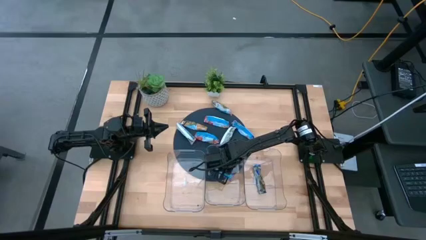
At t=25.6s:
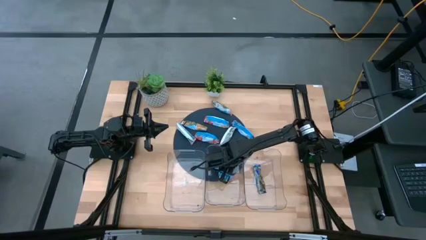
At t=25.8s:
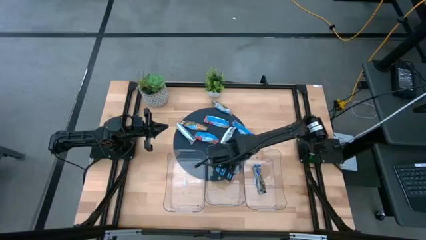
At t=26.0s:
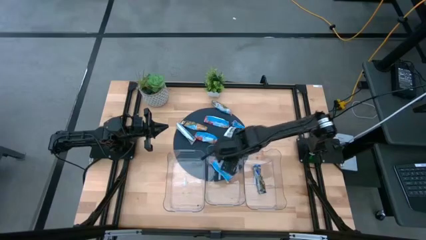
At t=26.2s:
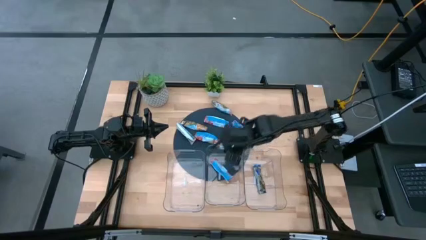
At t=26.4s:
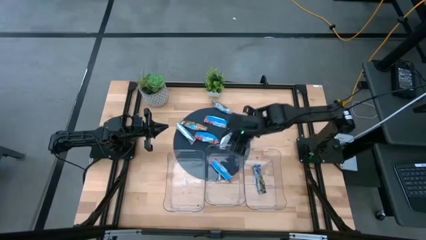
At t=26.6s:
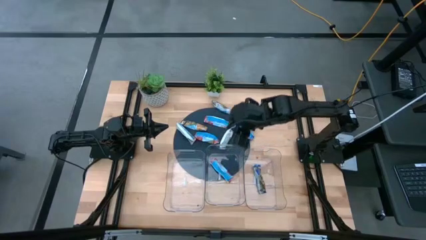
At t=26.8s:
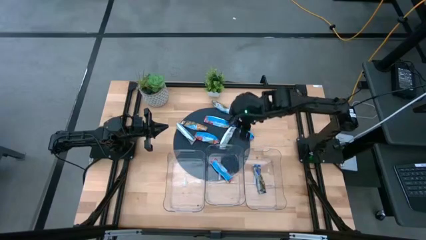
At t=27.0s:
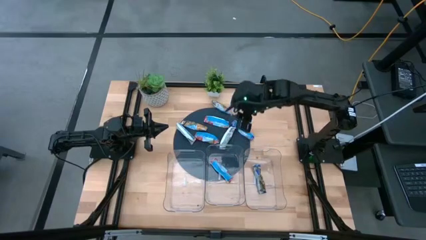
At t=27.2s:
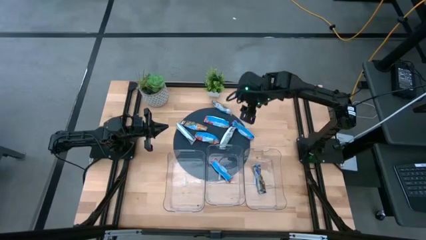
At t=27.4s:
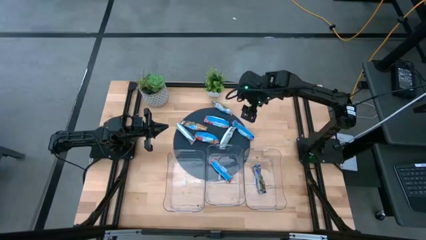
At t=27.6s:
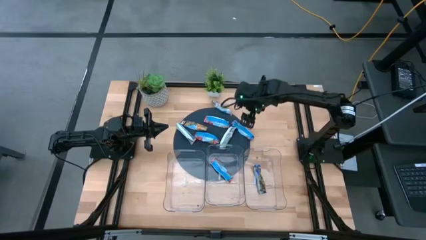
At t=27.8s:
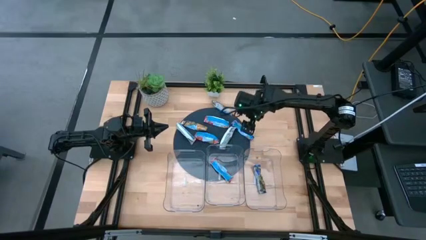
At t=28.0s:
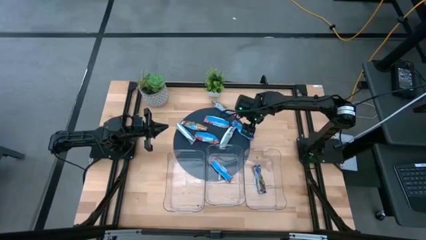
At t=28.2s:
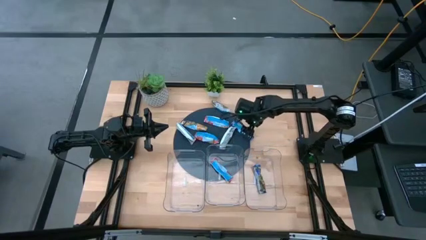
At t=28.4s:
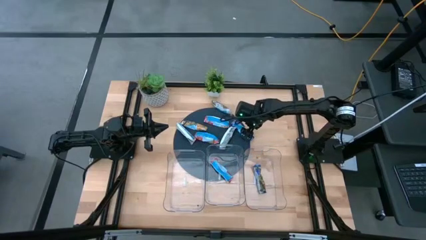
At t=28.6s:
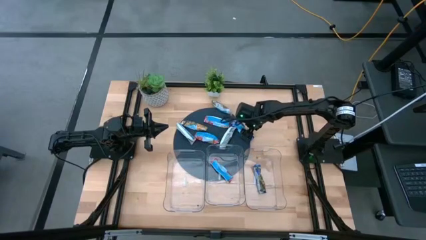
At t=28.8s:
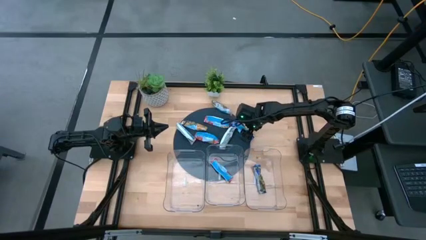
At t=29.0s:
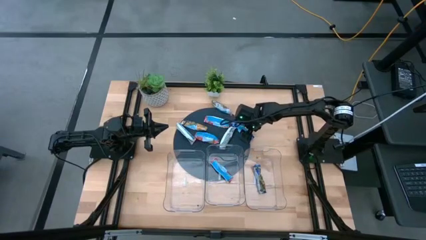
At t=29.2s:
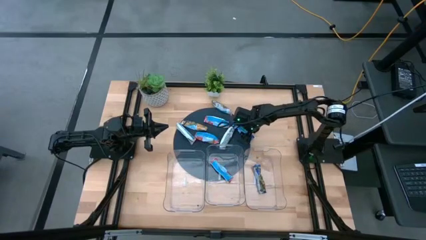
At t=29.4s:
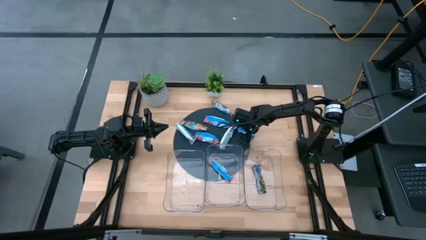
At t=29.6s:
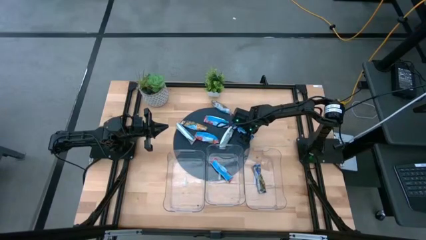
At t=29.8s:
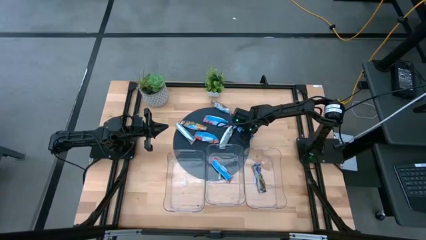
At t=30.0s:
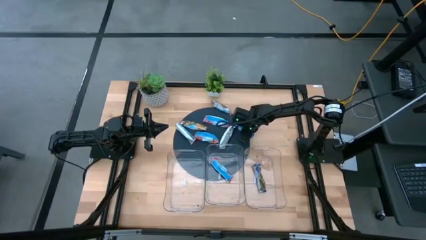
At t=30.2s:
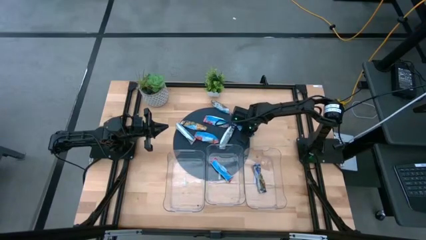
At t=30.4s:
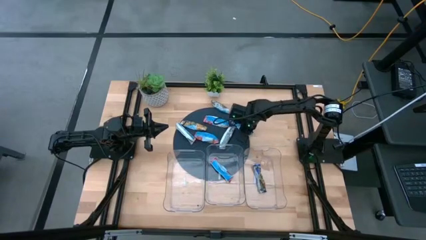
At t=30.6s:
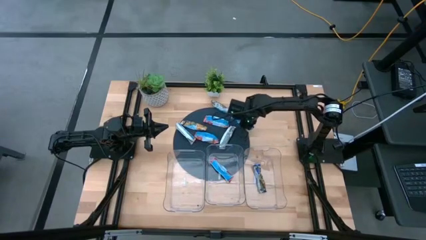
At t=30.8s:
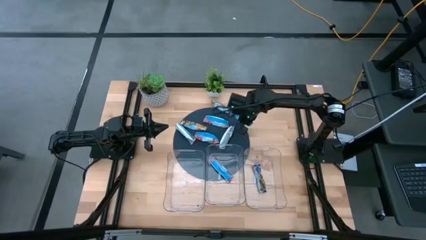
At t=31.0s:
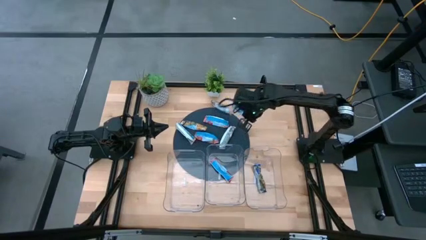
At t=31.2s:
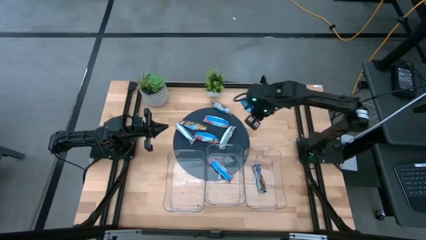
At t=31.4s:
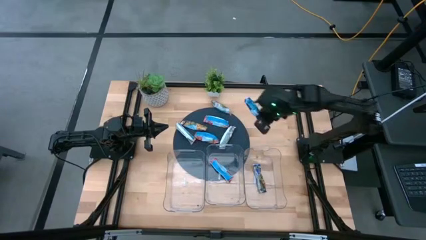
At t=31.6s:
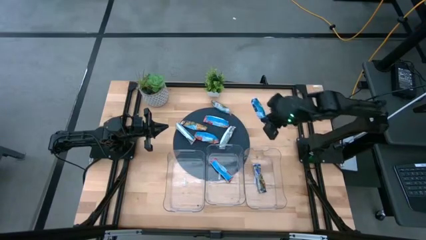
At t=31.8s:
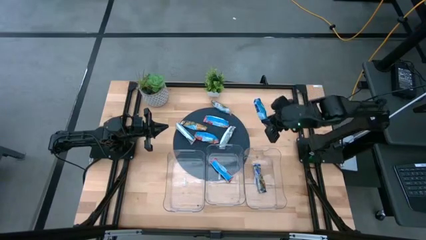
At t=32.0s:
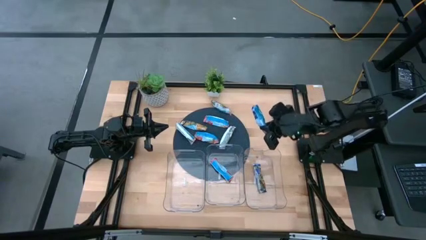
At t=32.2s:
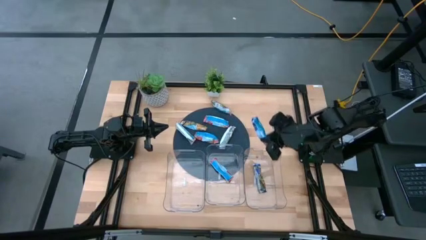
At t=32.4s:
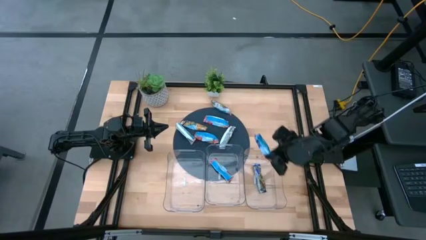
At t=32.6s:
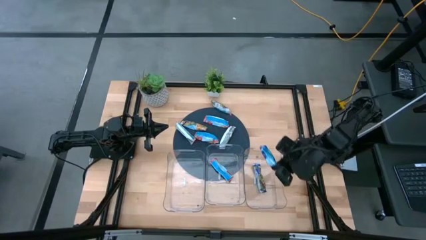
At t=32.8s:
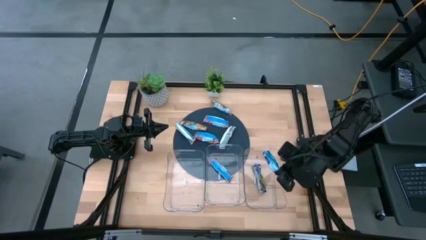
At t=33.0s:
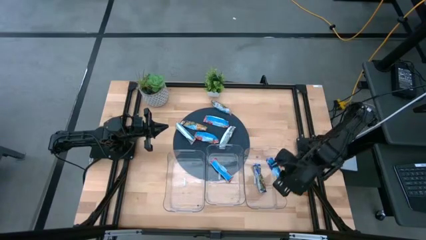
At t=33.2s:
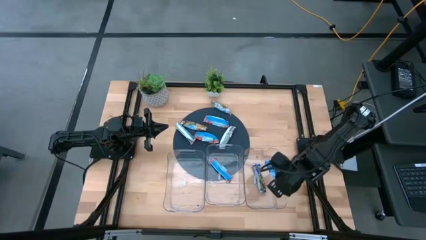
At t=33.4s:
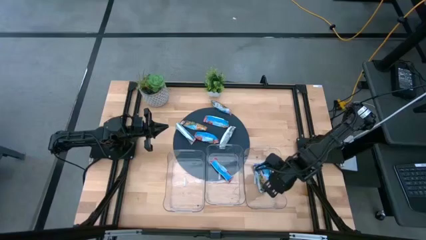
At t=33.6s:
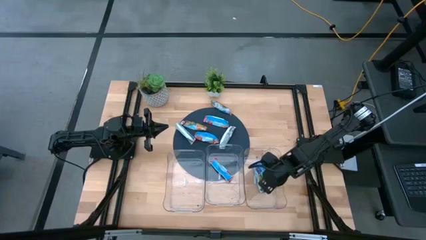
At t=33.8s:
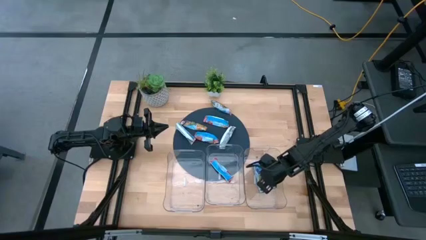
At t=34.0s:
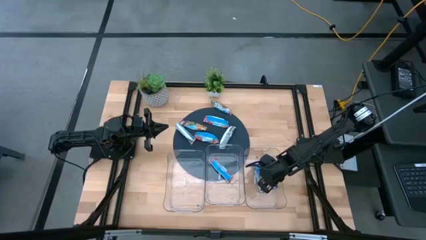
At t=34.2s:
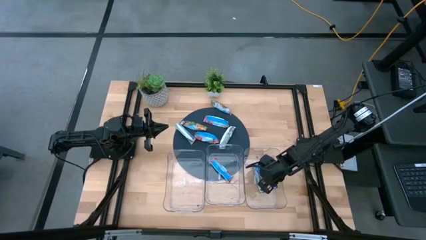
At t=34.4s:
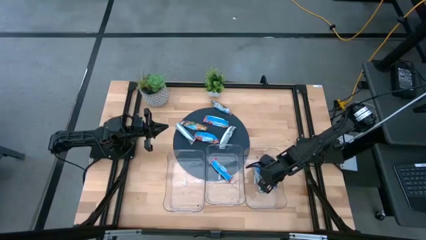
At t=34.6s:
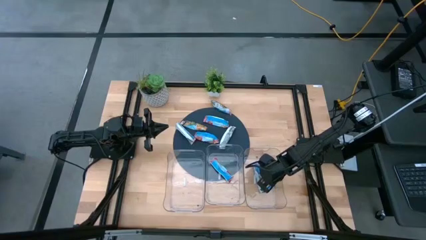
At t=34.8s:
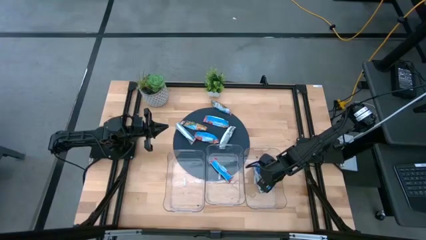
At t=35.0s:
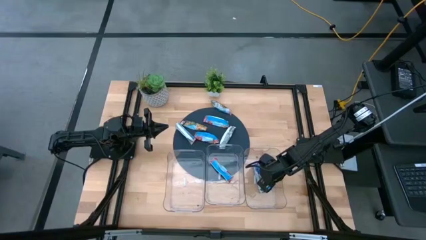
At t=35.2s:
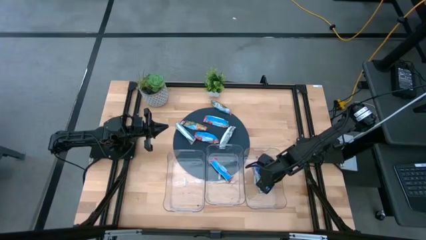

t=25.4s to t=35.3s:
Task: Pick and place Granola Bars by type
Put the blue granola bar into the right transparent bin

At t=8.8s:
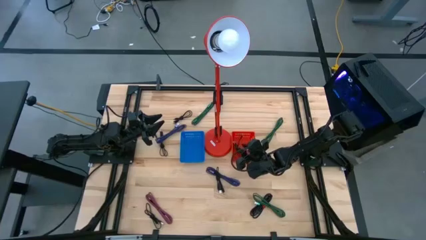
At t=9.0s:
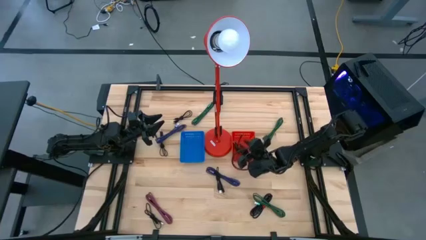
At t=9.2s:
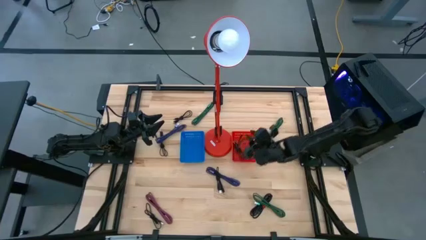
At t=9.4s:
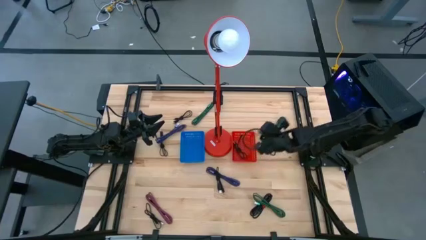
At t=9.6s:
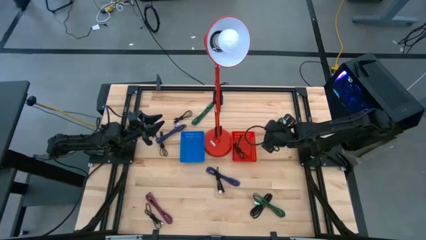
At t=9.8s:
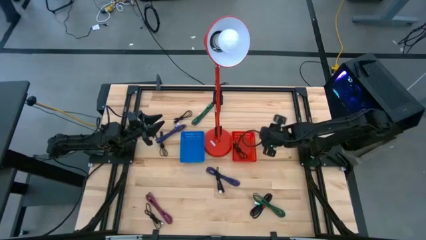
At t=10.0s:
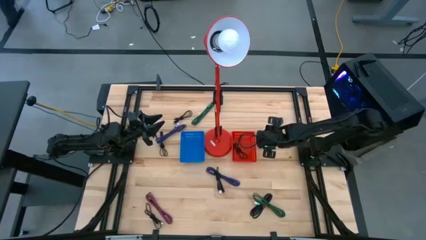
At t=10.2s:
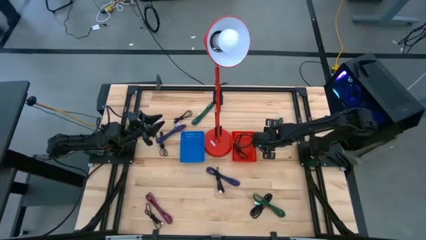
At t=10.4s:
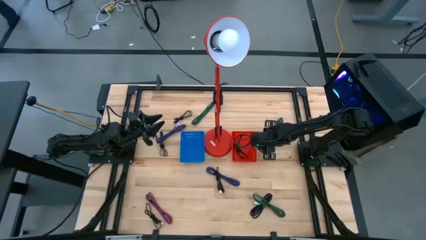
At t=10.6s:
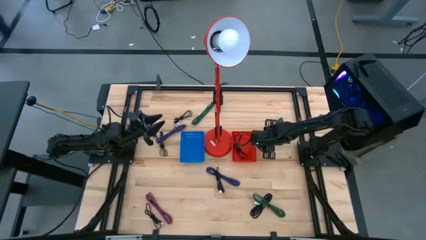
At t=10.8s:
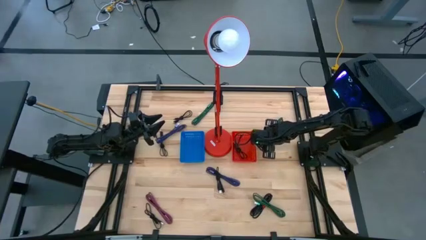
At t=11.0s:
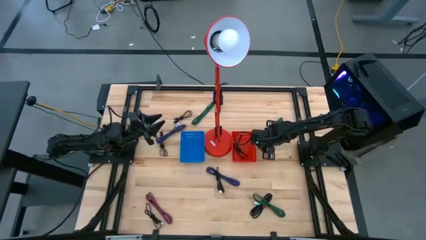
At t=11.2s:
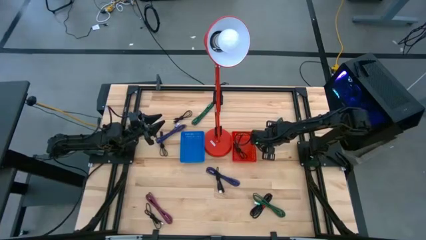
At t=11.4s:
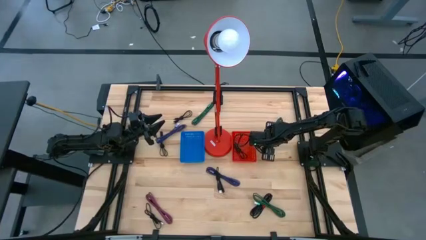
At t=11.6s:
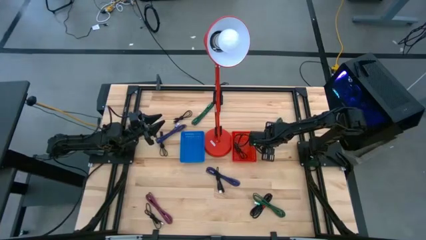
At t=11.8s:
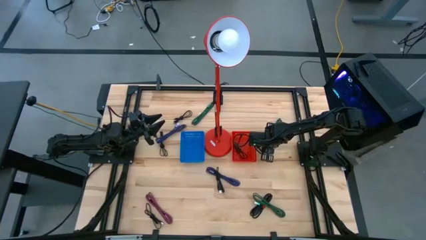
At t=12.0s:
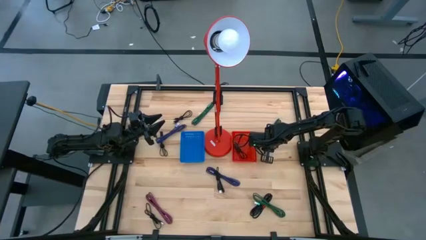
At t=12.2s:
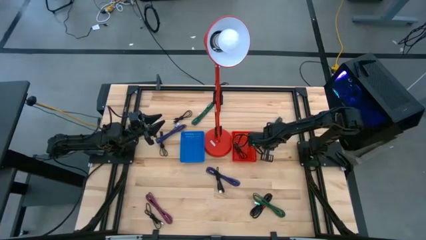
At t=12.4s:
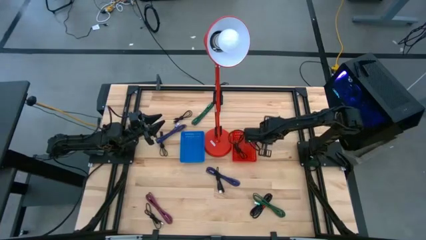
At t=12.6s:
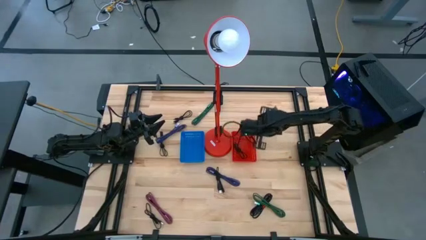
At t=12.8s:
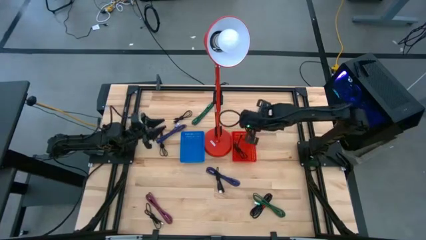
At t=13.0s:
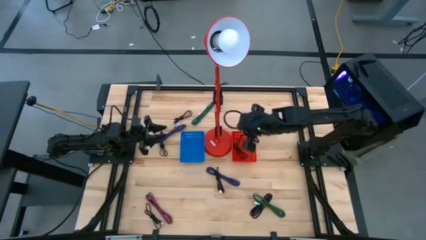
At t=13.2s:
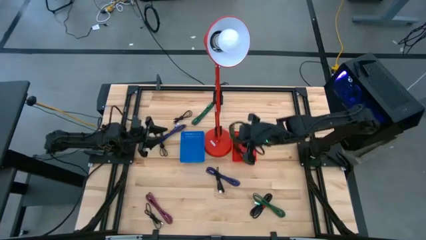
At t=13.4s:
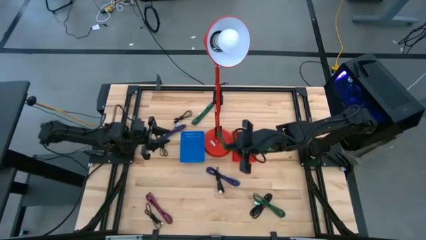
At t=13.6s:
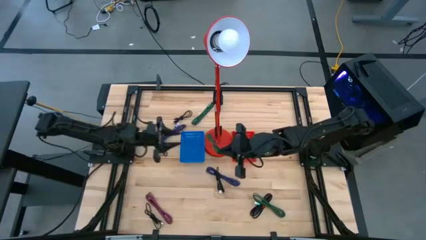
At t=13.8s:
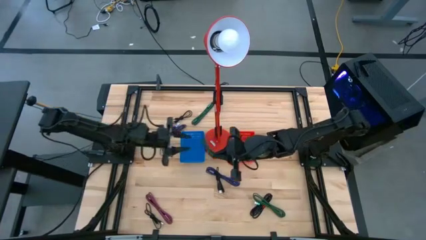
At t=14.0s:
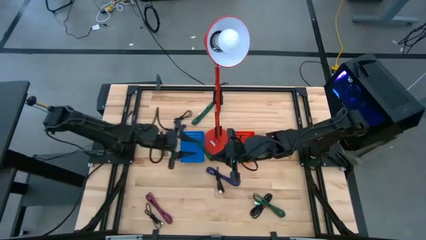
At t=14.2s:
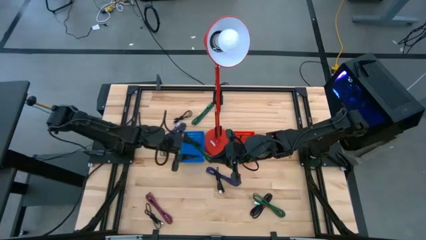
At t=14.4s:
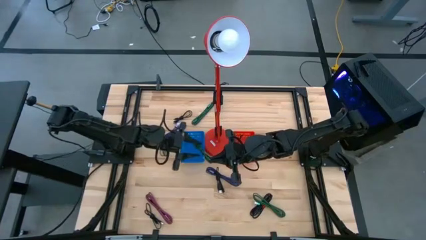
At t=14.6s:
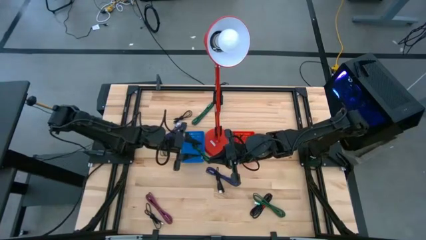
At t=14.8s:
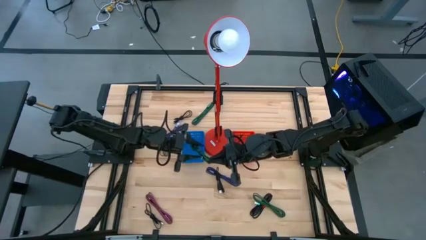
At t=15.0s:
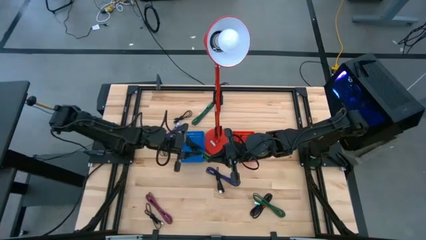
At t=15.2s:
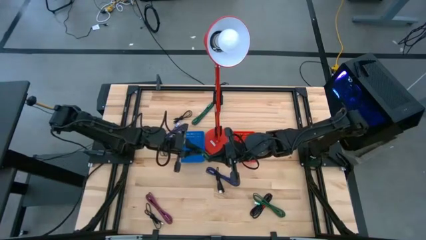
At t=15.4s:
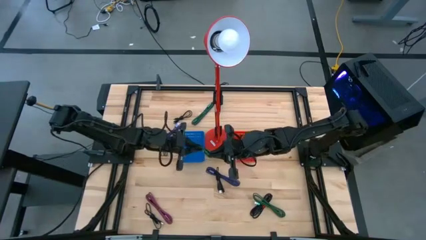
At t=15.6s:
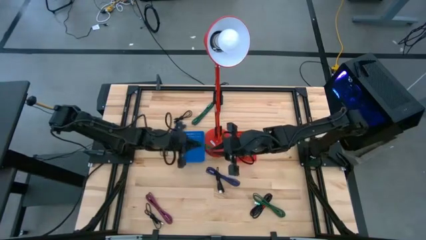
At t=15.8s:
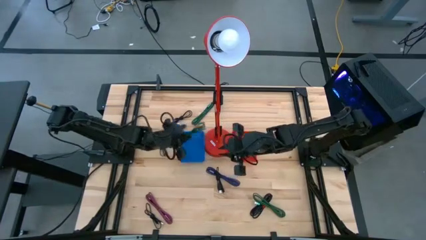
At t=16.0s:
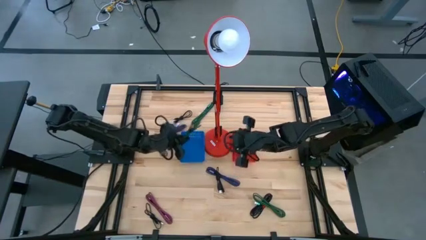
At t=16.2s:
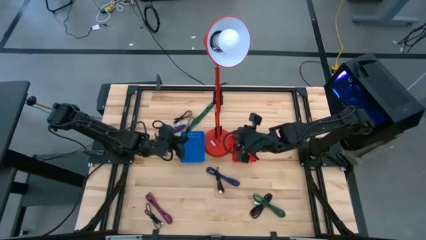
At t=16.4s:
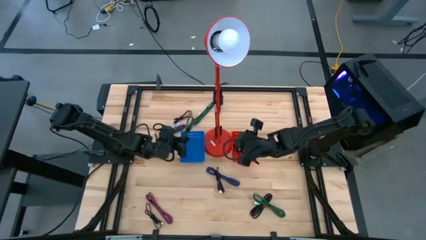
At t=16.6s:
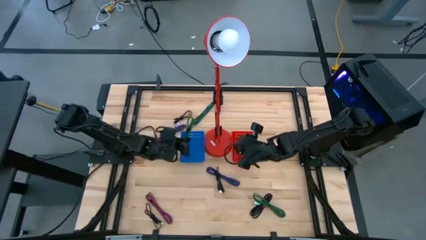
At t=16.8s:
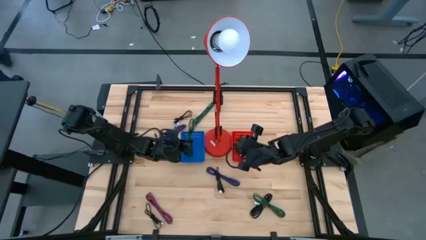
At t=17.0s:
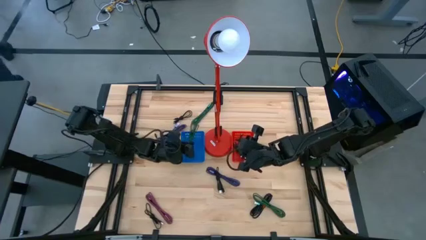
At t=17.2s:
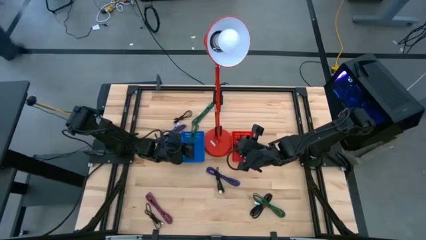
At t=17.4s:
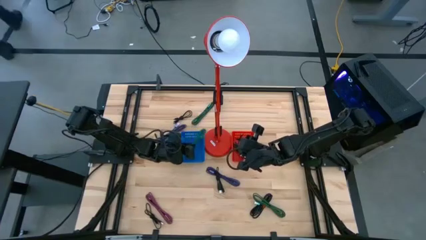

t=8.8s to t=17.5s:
Task: Pick & Place USB Port
Put the green charger cable into the blue bin
